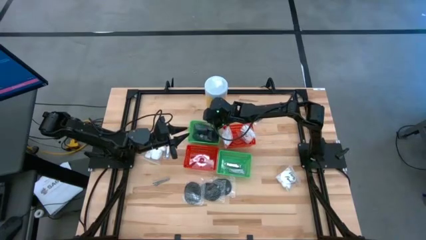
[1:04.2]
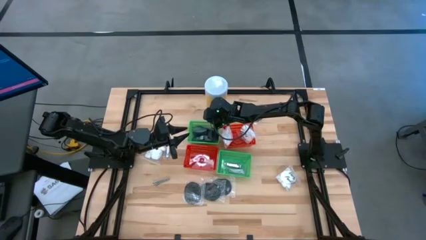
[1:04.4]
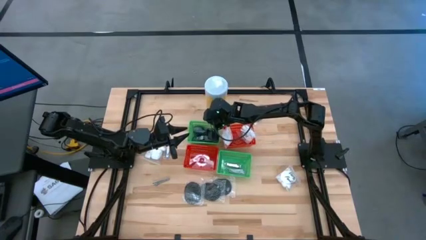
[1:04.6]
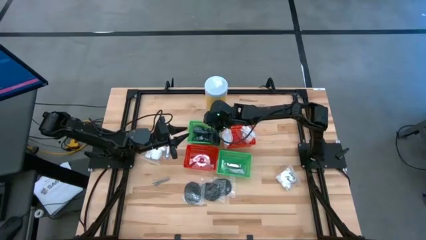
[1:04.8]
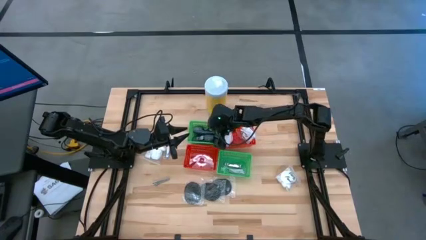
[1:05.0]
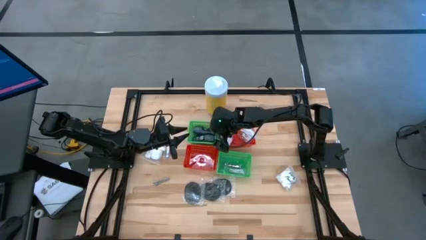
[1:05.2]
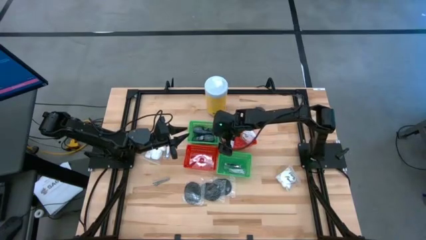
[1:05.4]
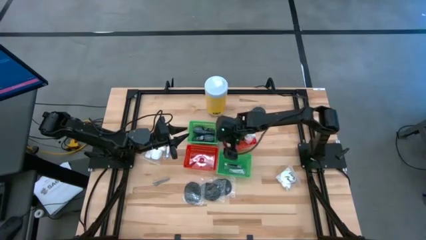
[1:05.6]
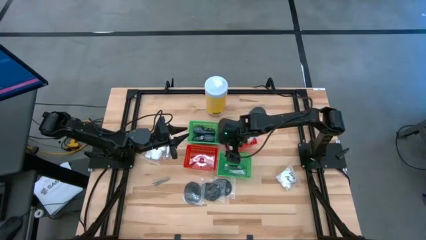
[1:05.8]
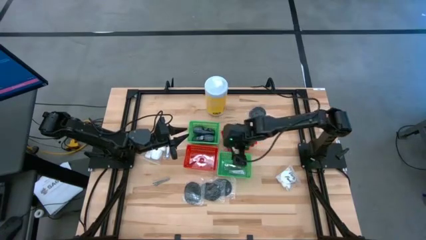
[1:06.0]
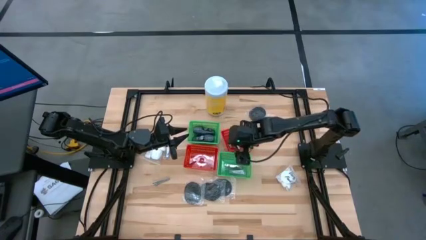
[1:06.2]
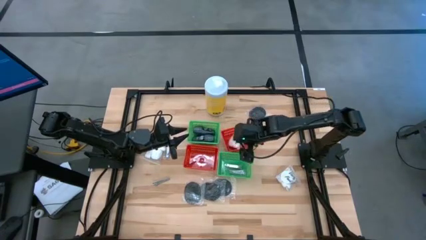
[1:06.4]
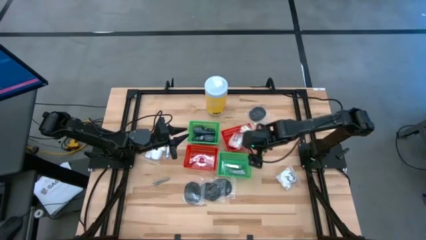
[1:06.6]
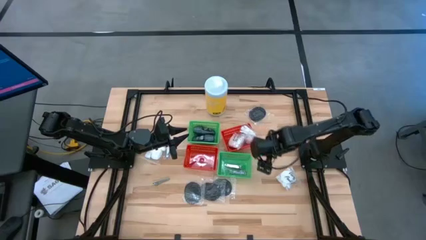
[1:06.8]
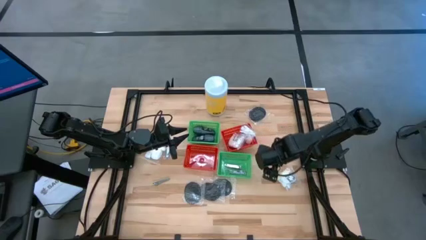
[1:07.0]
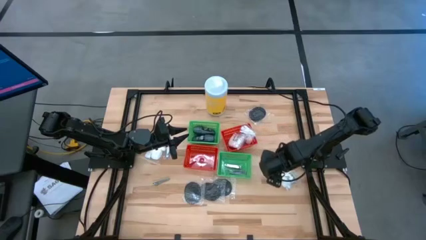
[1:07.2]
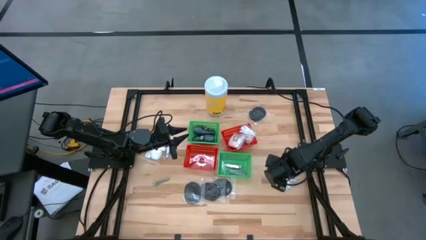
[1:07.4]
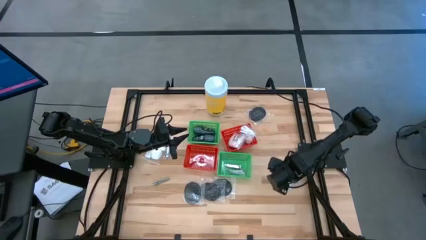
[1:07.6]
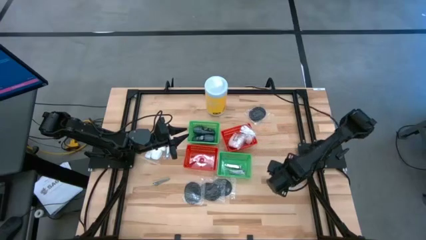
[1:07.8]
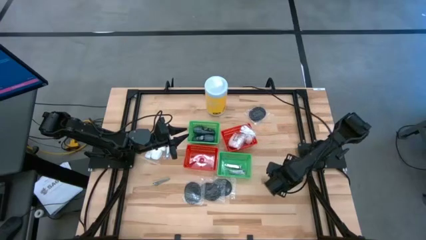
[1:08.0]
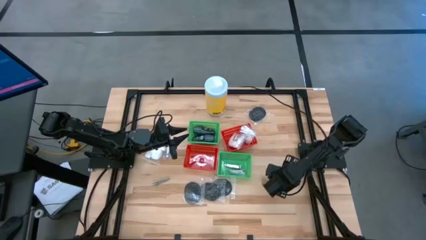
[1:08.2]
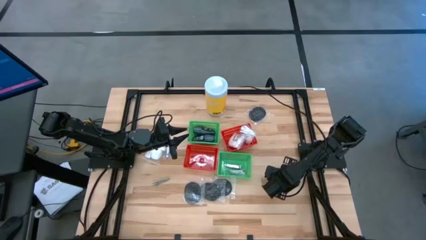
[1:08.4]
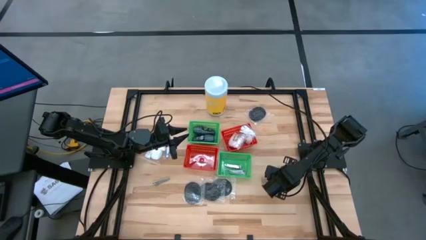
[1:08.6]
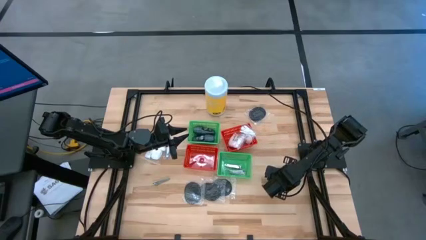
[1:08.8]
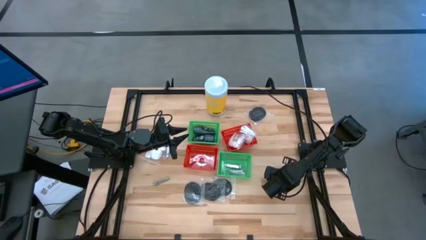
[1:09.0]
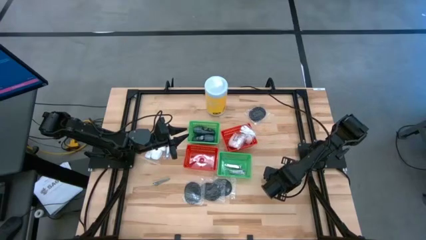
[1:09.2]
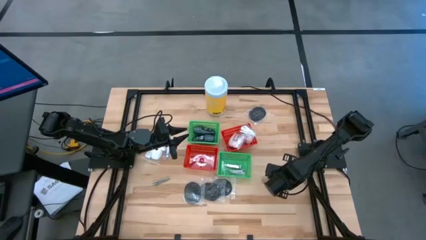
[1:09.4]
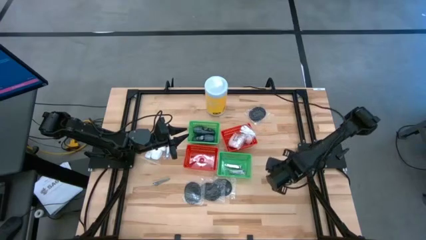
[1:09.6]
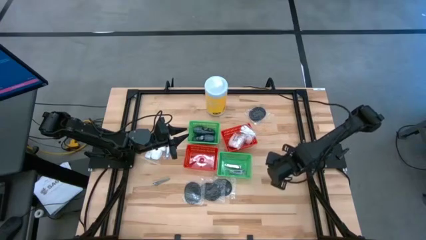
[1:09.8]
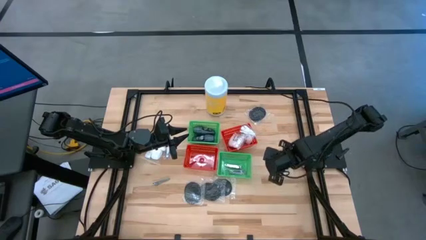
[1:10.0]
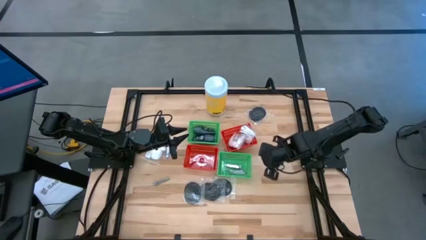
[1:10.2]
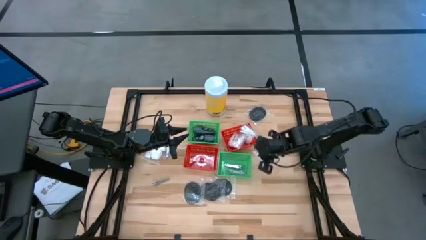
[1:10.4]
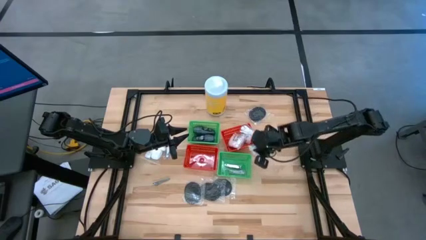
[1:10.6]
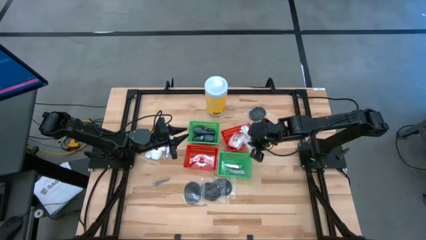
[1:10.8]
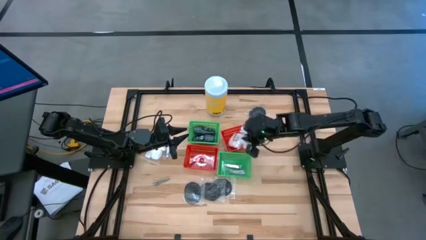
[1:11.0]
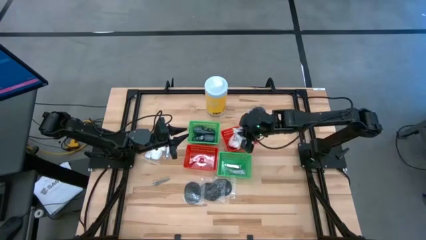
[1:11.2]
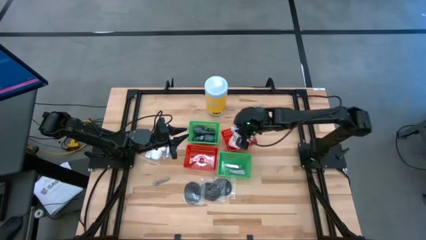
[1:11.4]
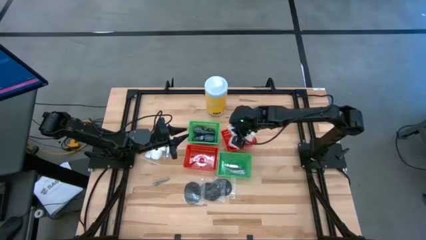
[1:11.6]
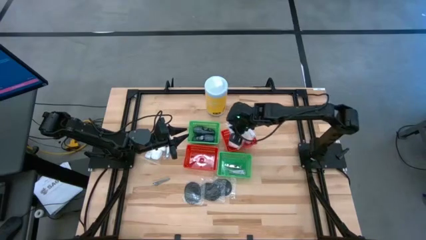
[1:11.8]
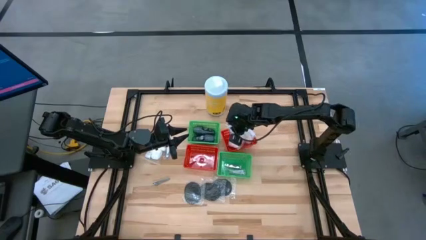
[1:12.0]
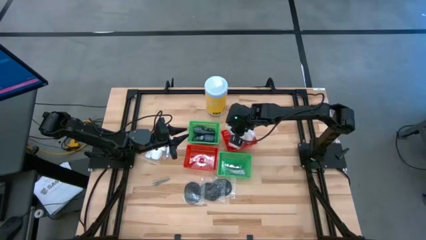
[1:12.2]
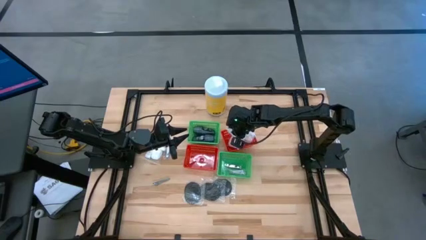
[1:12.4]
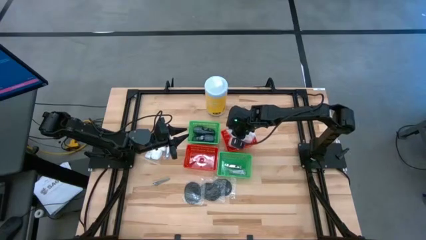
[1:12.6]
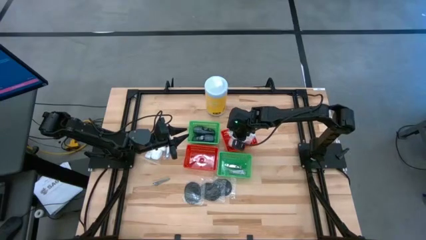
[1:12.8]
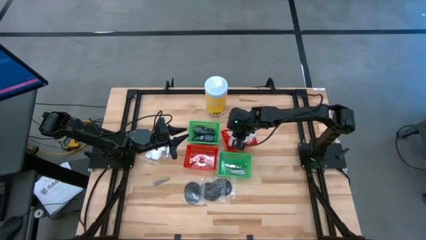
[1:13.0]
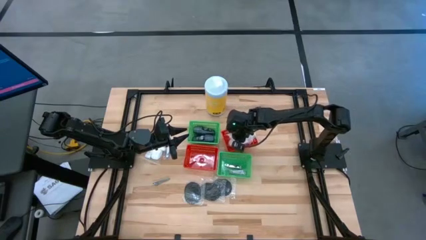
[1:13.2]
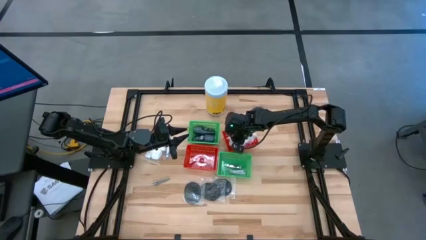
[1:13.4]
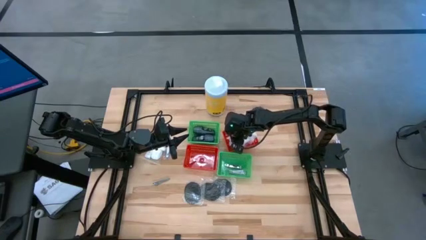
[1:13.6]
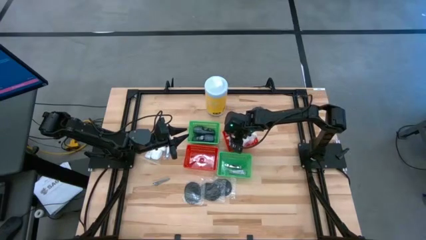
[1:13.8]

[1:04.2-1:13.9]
Task: Pick & Place Travel size toiletries
Put the cotton pack into the right red bin

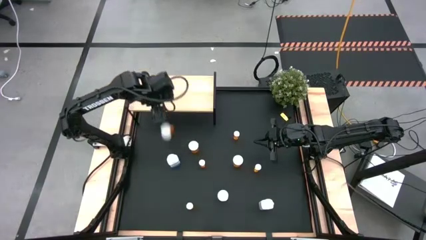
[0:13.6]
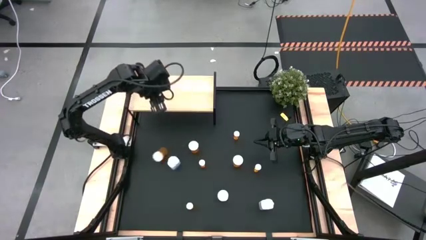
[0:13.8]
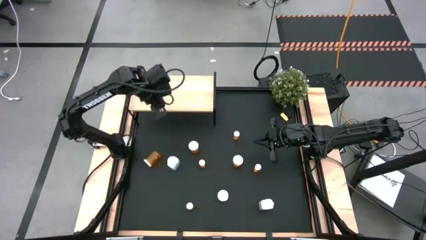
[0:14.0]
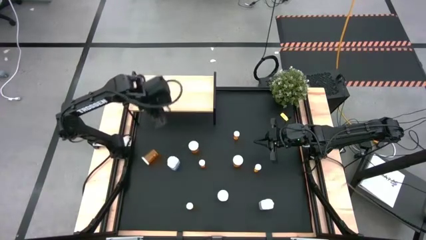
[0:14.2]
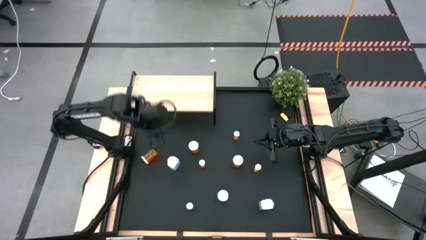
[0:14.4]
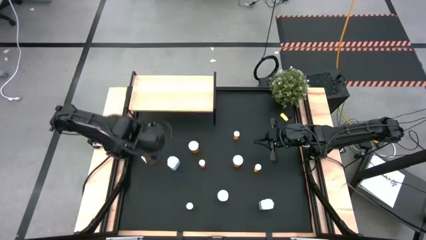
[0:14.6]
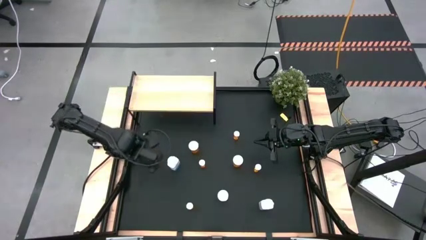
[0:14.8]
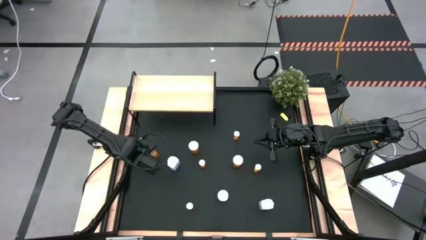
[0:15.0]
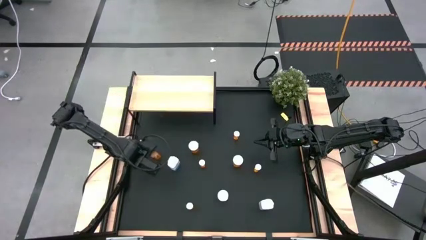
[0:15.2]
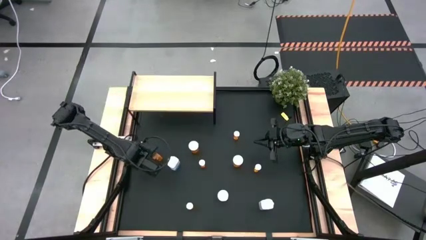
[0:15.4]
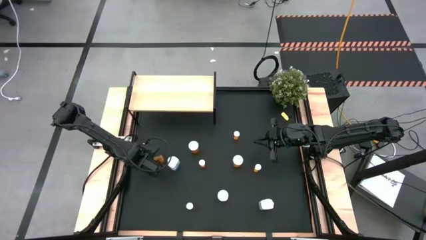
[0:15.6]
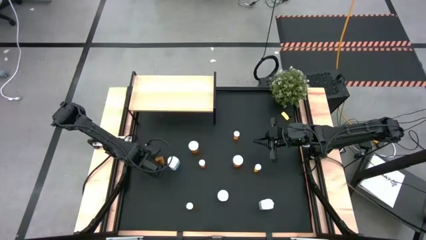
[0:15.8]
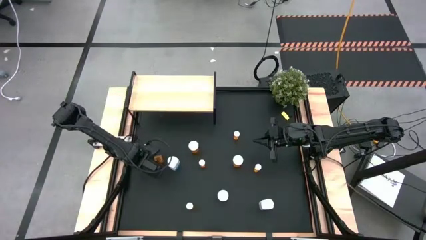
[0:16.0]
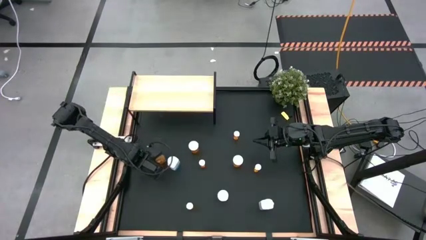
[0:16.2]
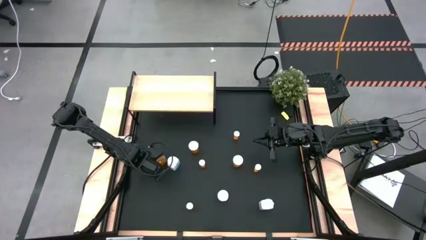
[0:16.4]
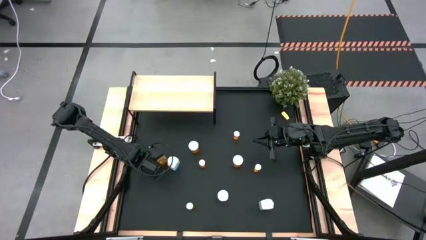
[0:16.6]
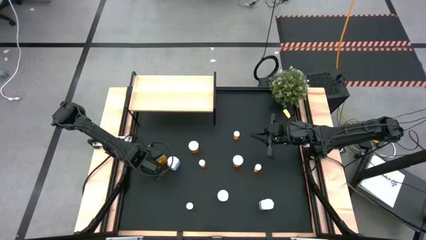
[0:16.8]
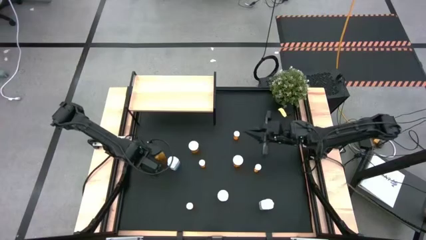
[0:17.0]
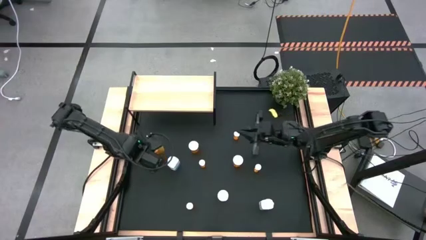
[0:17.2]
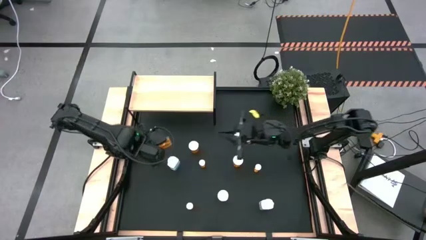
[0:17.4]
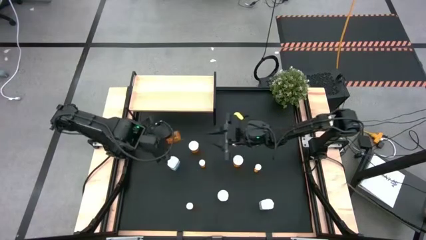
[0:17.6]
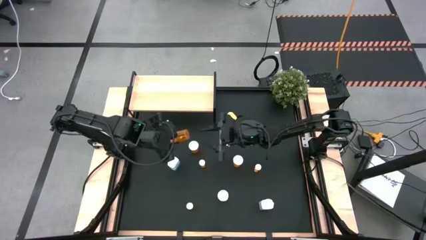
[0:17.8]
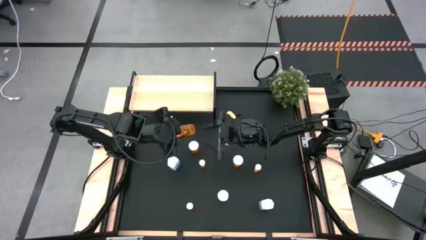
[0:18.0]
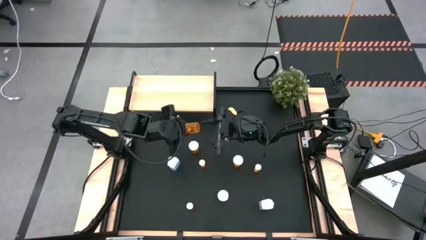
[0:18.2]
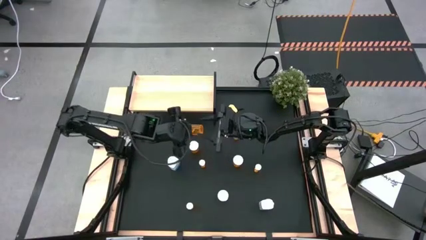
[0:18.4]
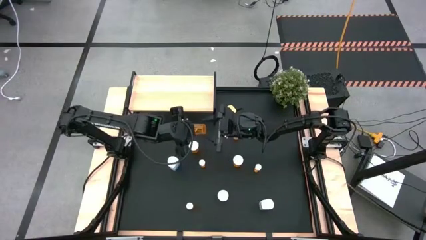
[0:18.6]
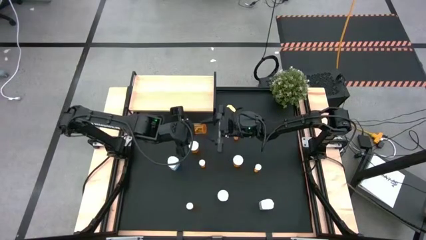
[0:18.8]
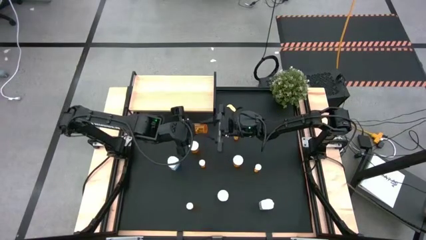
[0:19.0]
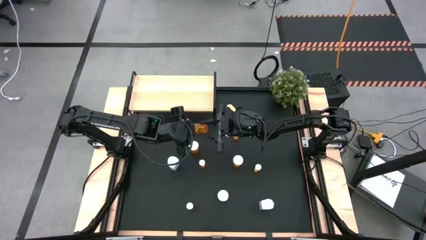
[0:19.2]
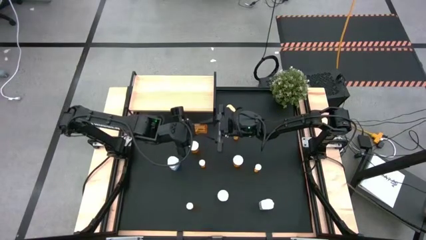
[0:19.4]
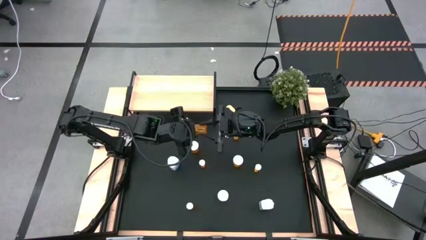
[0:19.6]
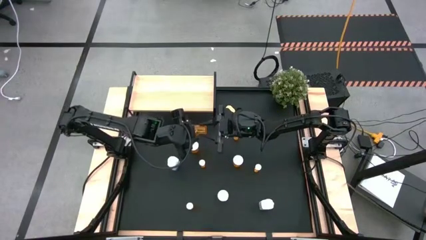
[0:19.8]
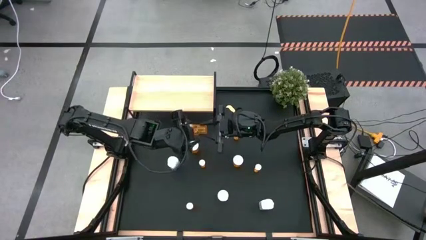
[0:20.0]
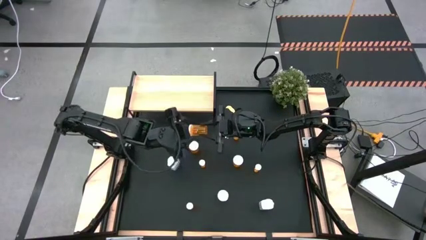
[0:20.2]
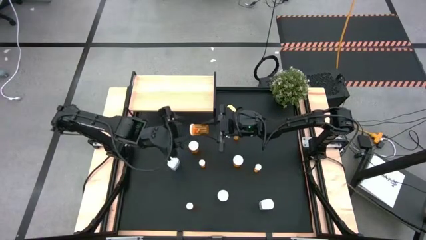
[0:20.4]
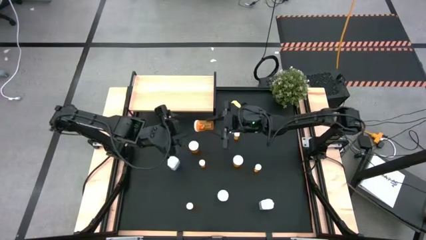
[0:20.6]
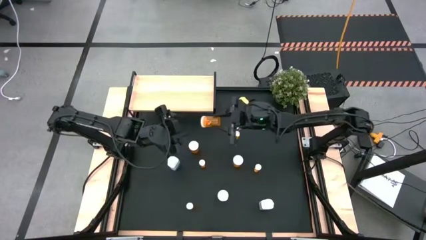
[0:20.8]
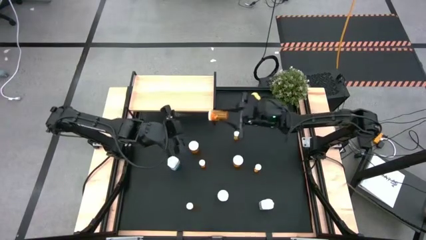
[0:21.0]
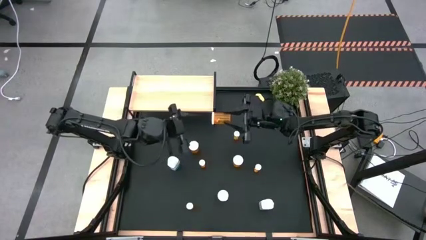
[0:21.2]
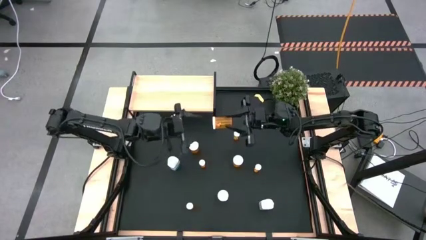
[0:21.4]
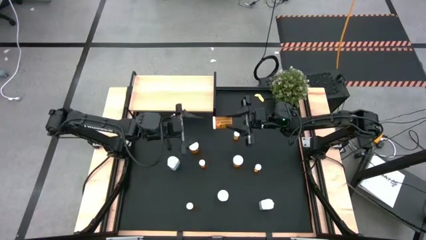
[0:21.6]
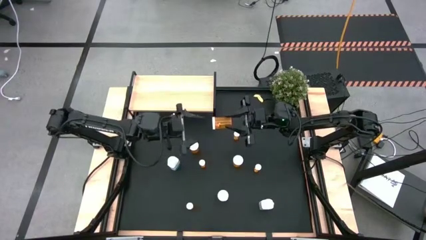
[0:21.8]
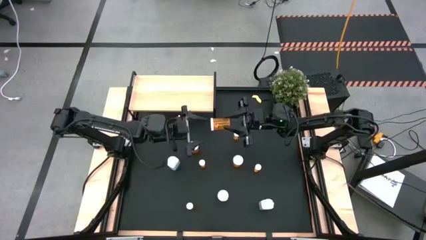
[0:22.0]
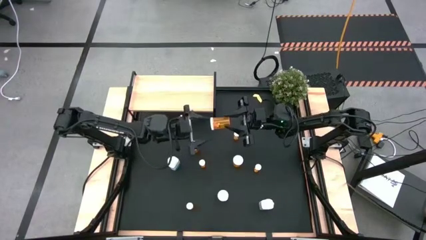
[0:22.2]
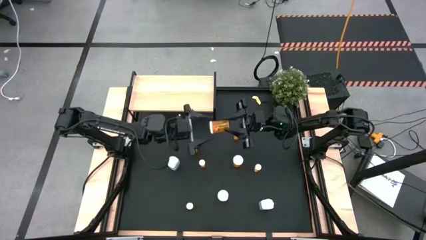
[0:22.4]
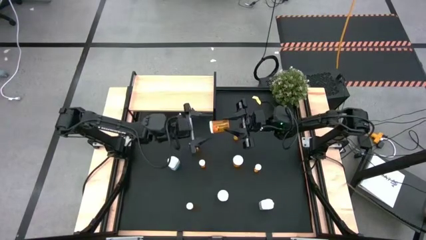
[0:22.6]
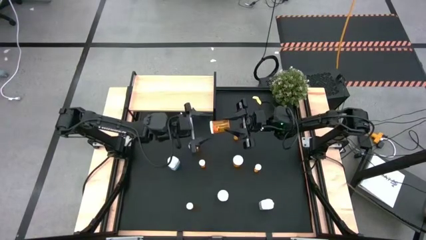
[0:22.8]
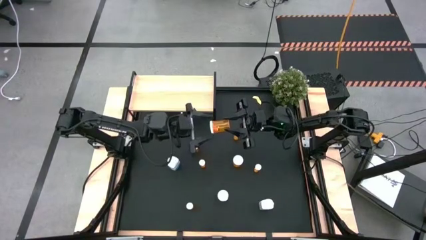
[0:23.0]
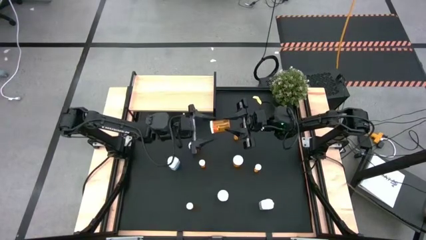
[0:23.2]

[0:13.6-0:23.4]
Task: Pick and place medicine bottles onto shelf by color
Put the large orange pill bottle on the shelf
